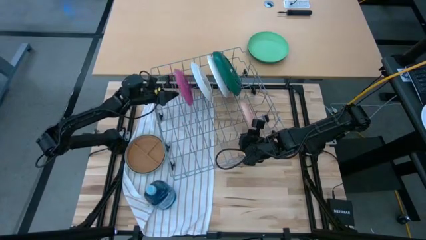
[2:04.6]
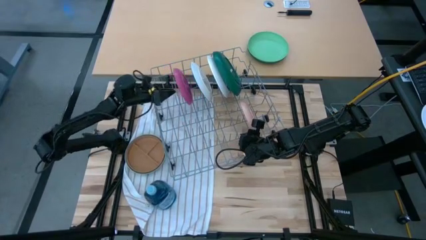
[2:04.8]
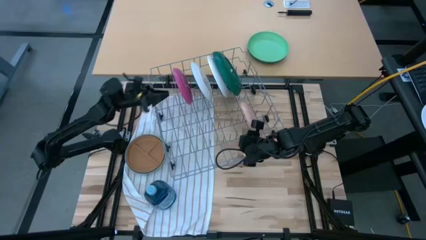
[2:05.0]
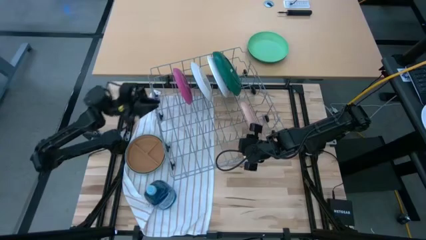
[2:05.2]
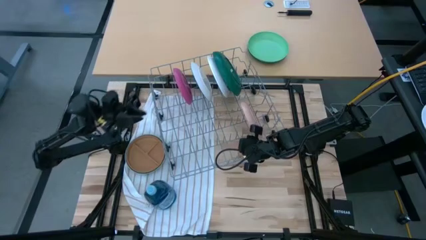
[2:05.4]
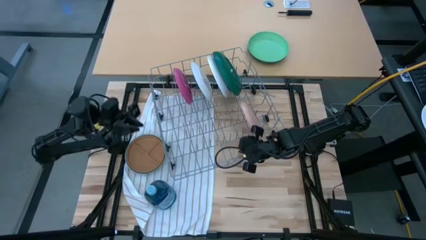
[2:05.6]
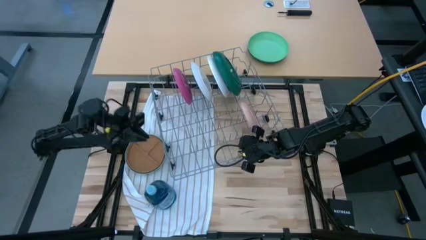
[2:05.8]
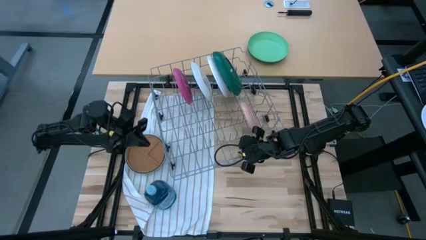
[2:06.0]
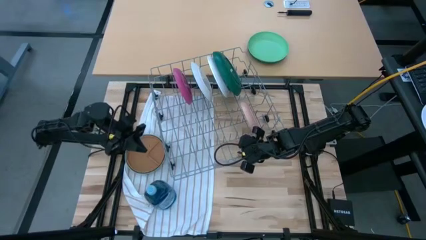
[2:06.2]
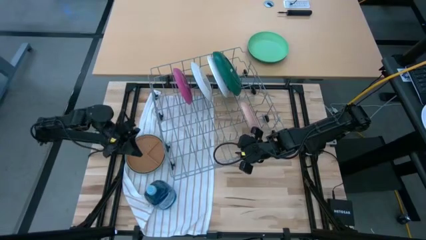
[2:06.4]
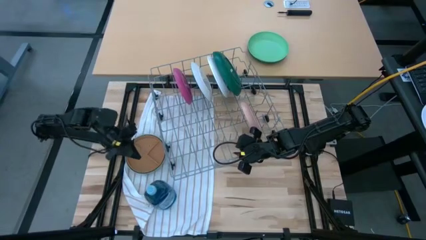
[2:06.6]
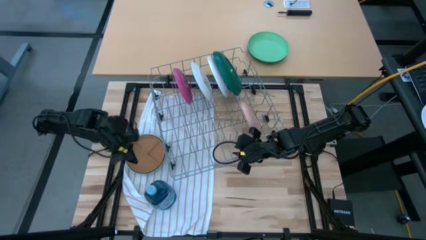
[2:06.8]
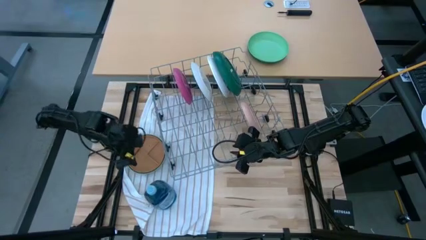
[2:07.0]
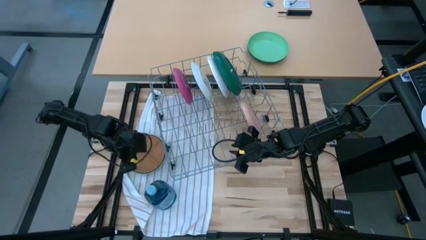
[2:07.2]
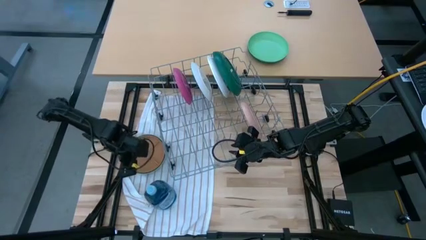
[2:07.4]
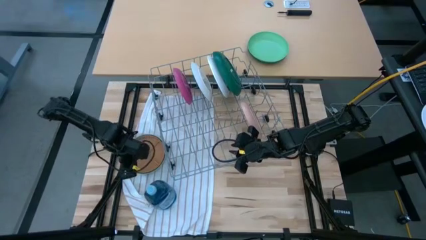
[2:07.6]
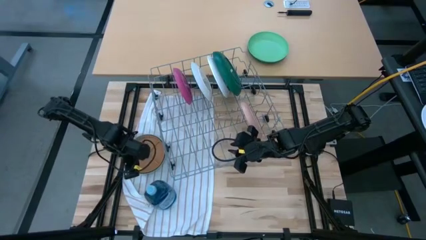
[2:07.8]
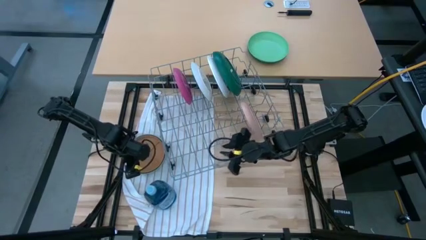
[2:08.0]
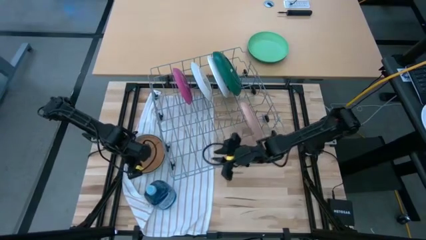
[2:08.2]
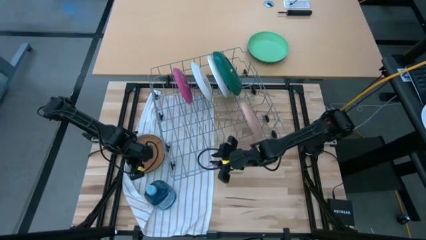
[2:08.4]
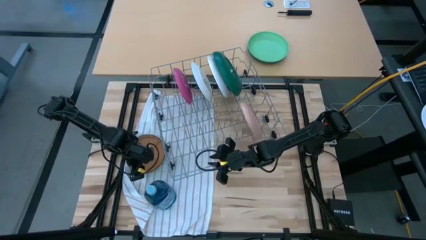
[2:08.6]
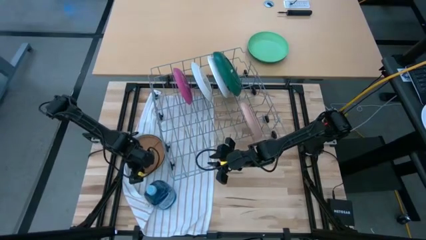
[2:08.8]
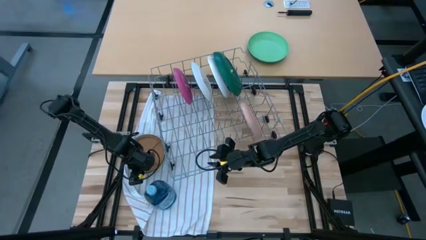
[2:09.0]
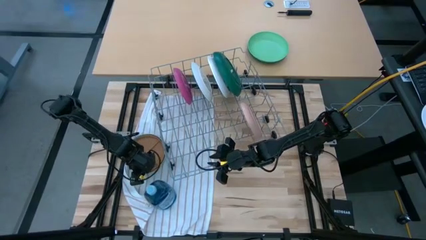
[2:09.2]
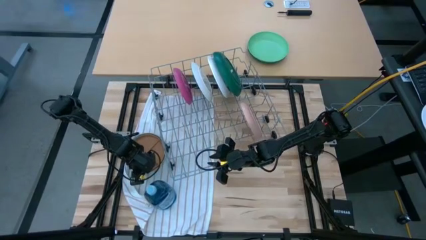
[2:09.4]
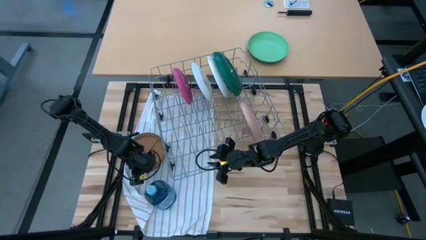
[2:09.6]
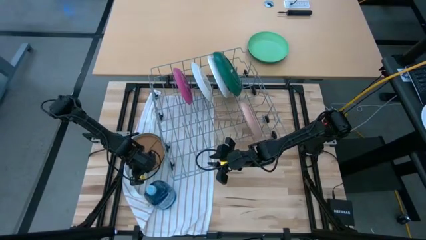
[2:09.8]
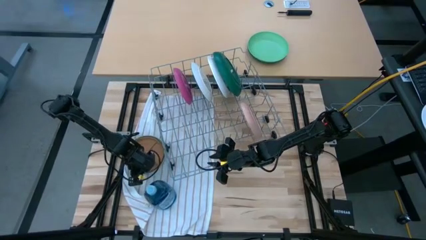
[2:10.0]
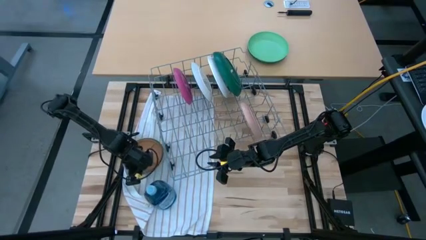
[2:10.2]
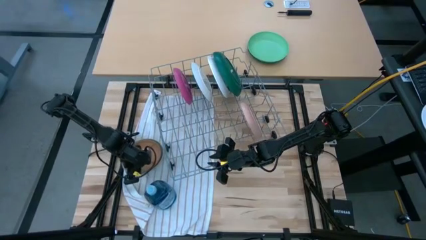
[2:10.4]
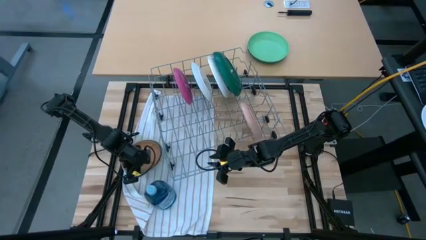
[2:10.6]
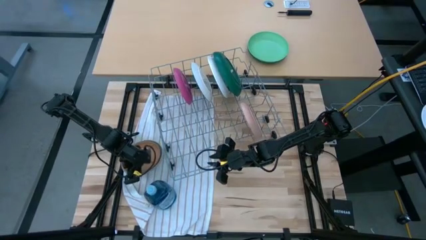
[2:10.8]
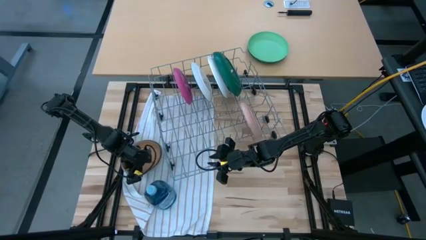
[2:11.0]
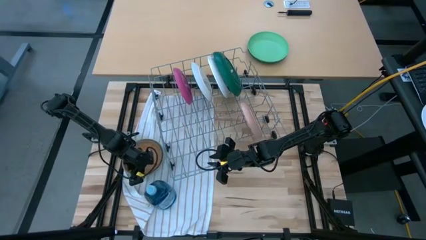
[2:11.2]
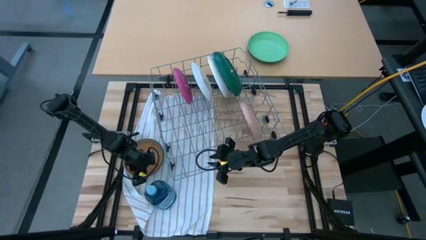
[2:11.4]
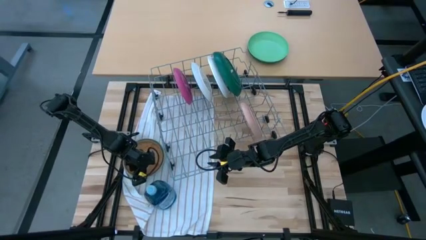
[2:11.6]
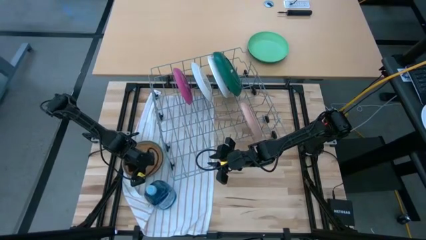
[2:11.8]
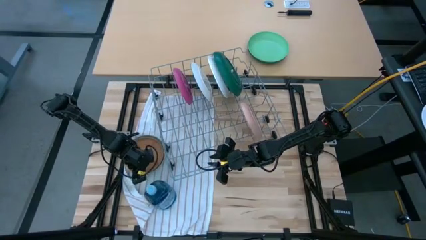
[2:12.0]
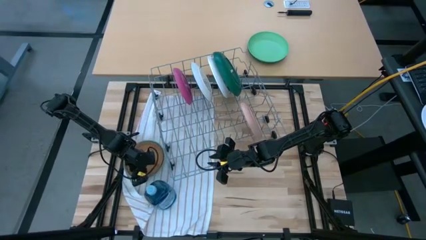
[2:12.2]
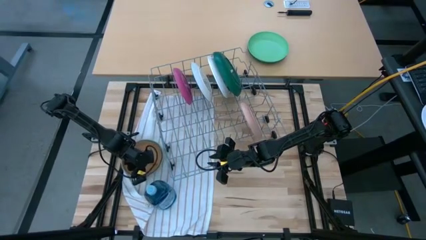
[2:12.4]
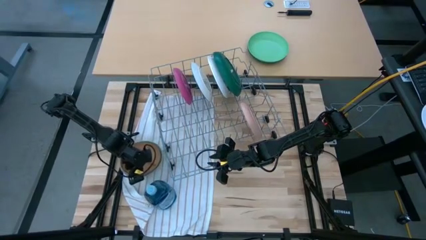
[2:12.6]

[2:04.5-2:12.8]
Task: Sort dishes
Put the brown plate into the dish rack

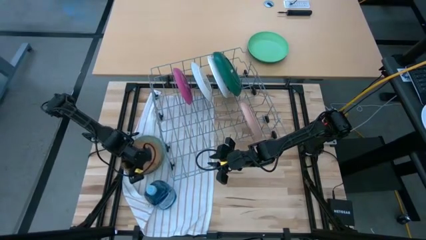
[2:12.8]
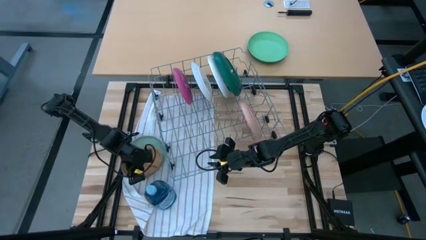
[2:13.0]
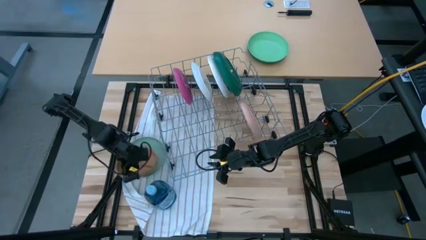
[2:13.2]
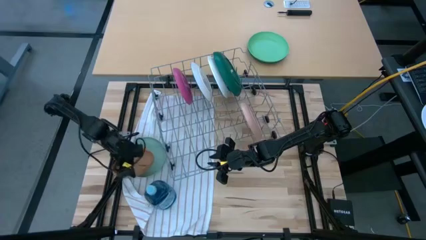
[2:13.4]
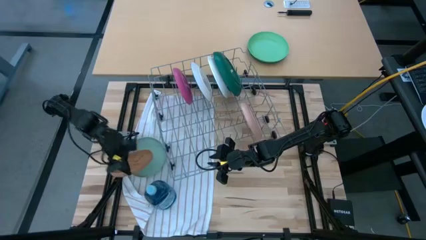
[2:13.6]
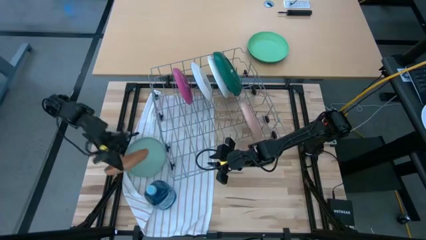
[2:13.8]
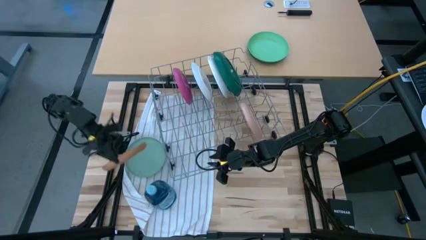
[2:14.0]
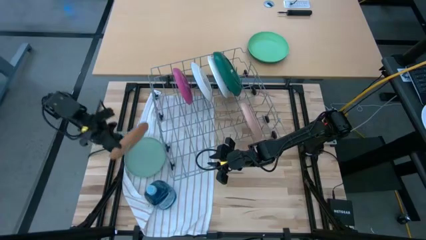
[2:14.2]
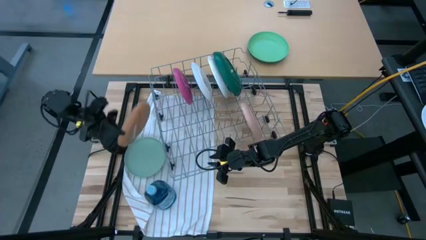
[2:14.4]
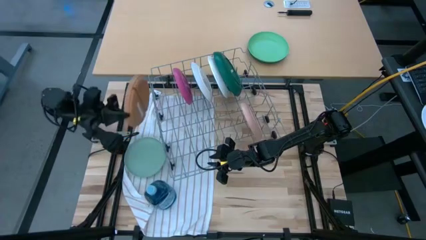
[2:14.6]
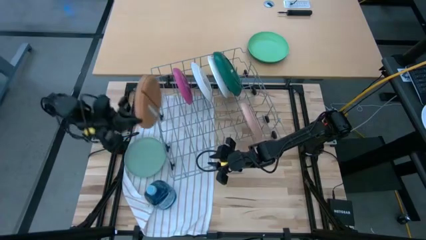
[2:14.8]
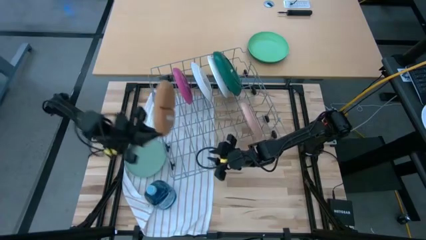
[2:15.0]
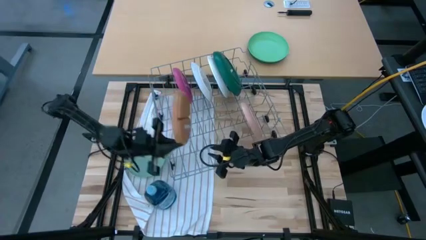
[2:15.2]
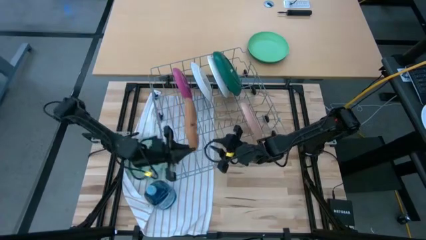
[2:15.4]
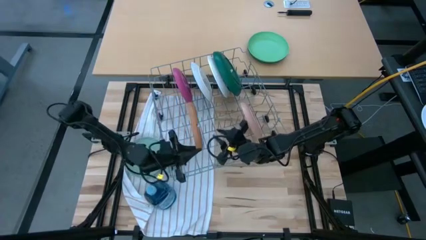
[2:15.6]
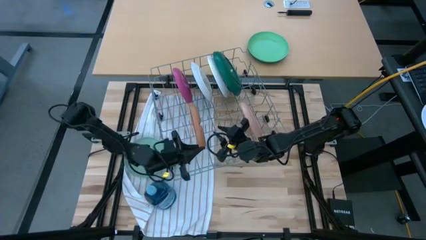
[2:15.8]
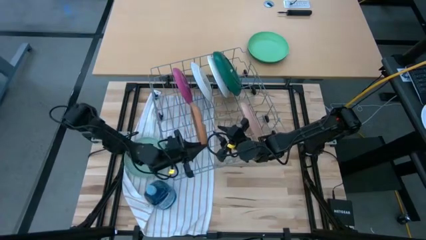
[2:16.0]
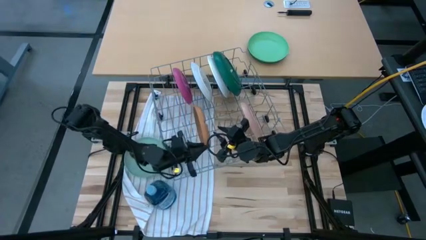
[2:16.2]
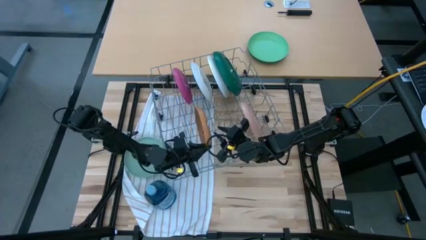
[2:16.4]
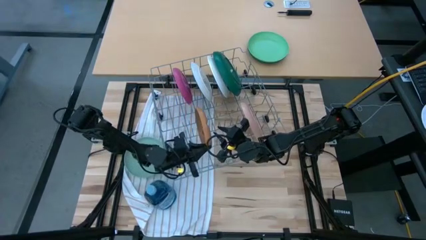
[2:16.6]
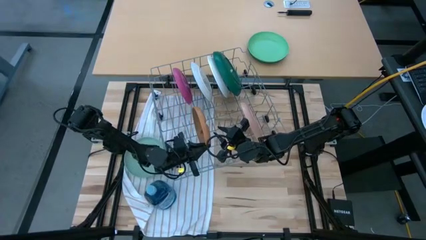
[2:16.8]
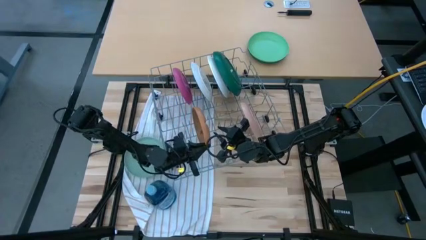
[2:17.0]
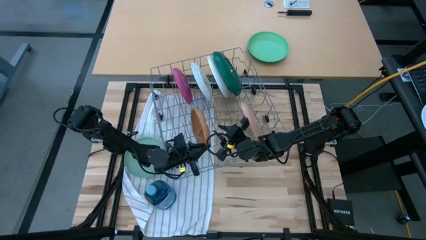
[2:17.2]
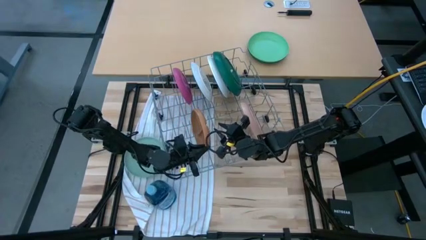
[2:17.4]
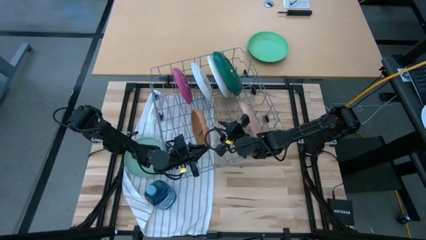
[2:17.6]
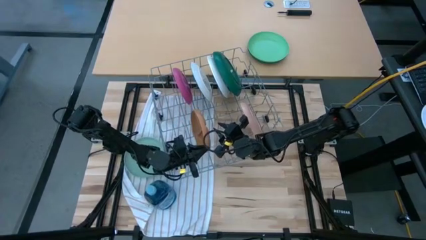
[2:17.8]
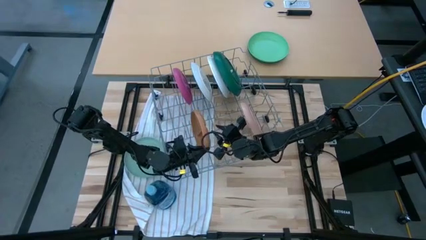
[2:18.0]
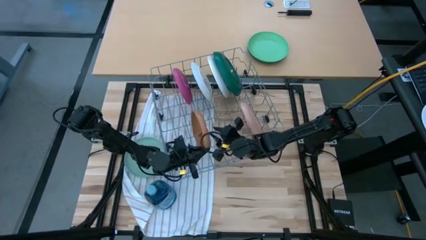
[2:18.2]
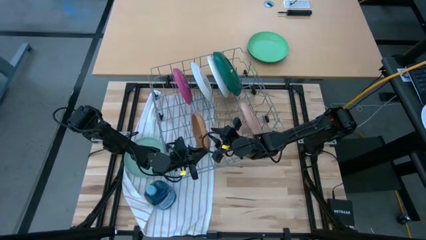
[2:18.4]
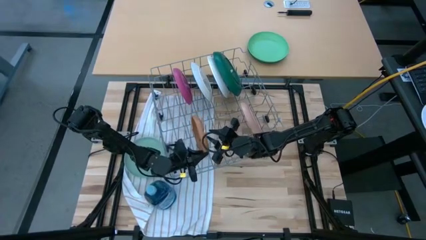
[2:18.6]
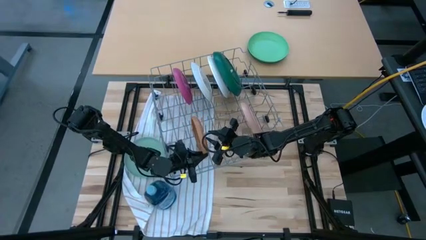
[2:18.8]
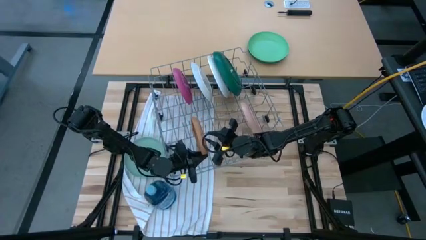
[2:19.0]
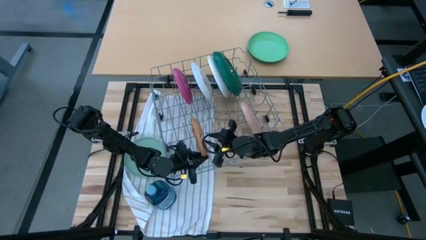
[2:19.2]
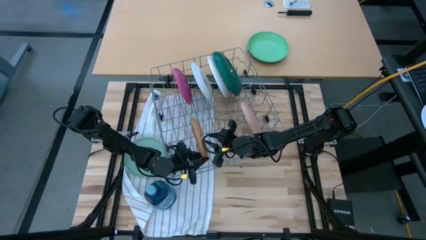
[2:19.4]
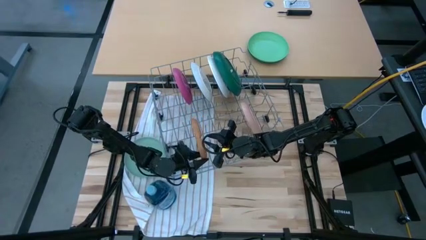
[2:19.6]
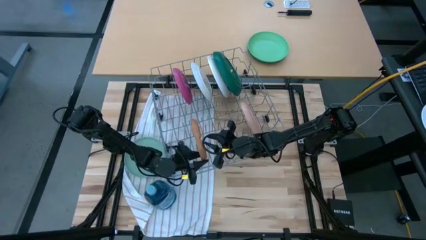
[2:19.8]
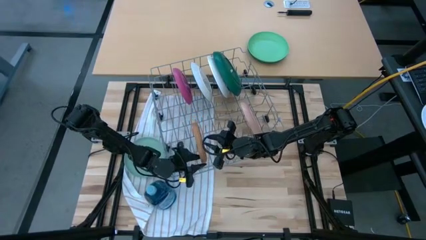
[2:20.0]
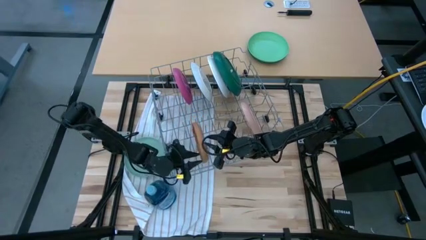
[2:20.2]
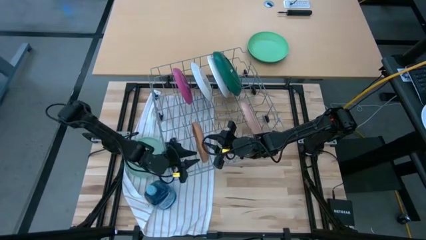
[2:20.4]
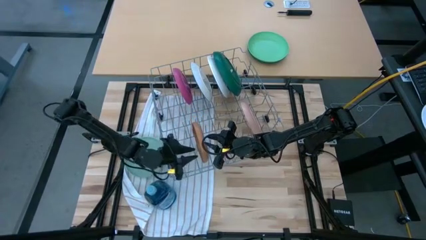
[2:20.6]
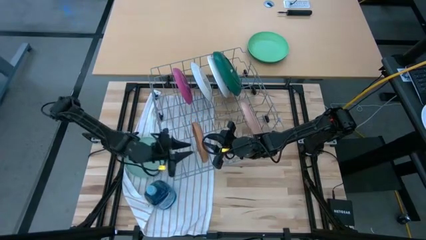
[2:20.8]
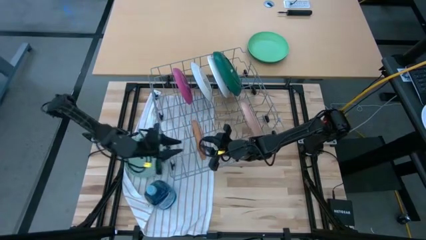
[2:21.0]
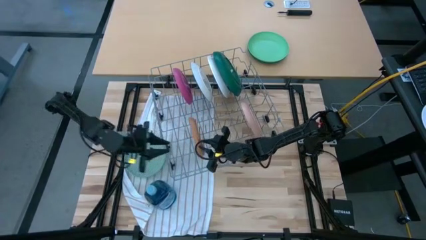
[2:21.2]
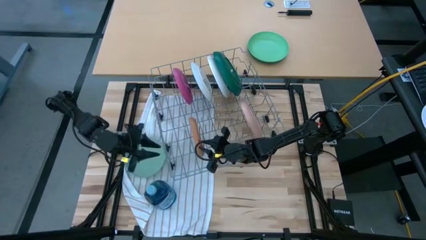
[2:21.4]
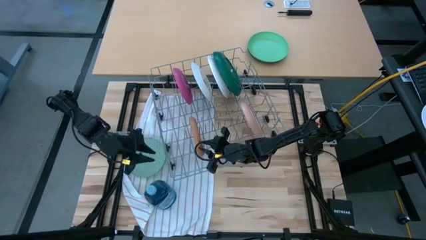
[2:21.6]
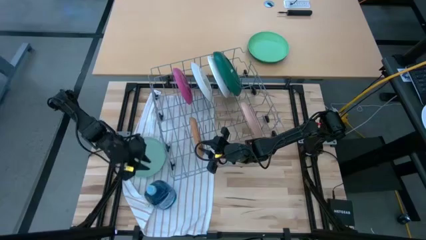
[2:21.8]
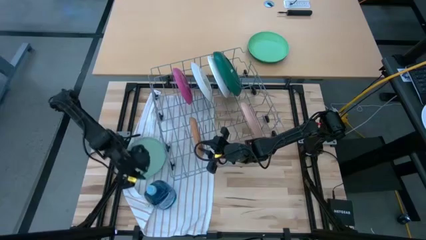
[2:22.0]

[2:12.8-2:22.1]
Put the brown plate into the dish rack
